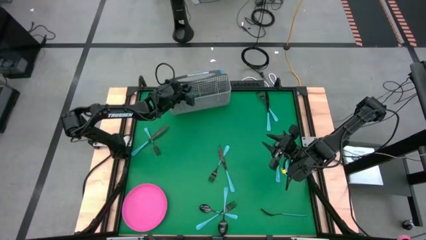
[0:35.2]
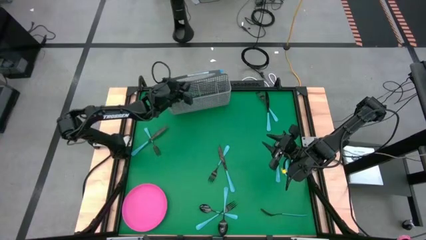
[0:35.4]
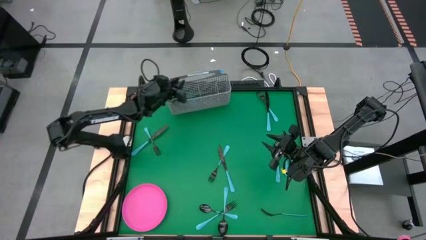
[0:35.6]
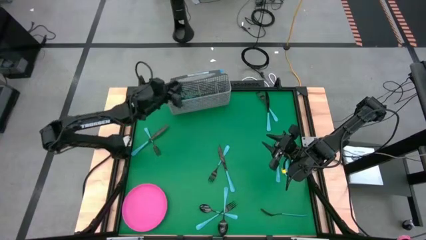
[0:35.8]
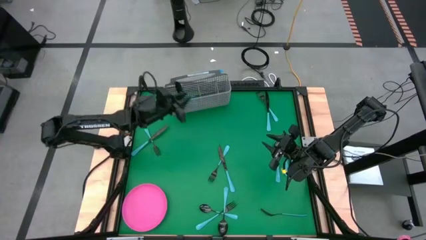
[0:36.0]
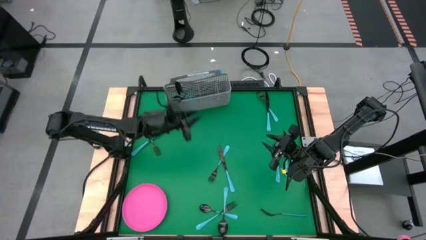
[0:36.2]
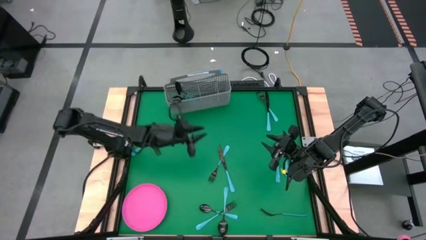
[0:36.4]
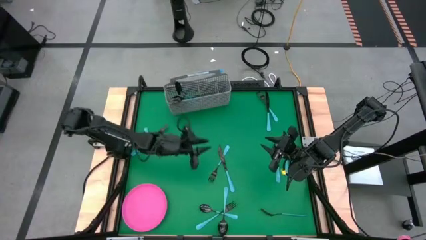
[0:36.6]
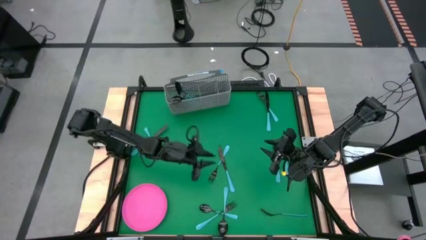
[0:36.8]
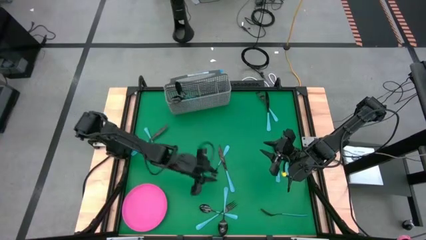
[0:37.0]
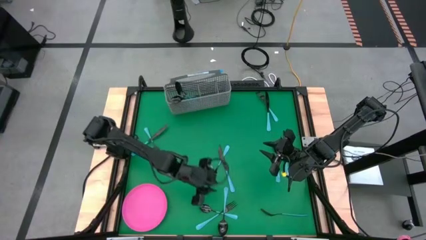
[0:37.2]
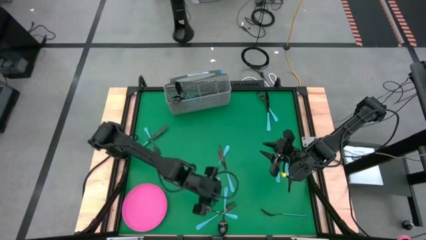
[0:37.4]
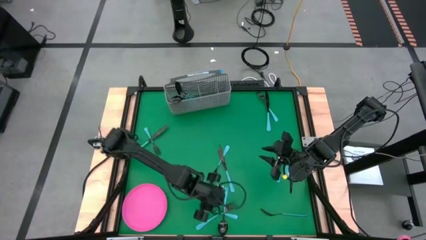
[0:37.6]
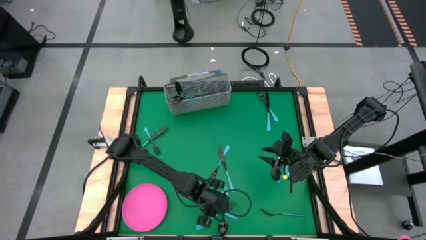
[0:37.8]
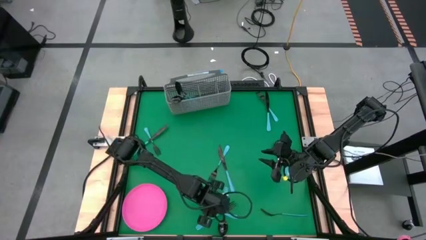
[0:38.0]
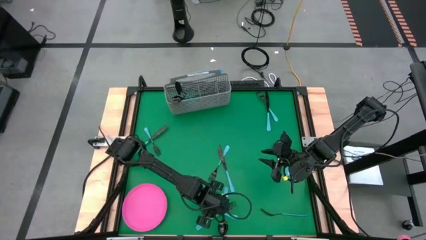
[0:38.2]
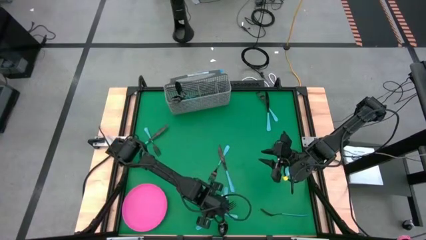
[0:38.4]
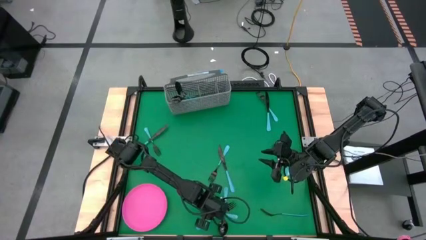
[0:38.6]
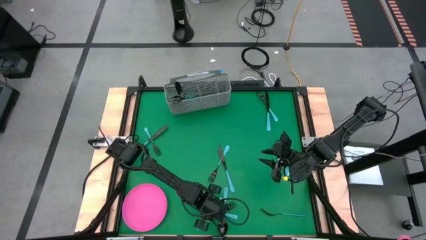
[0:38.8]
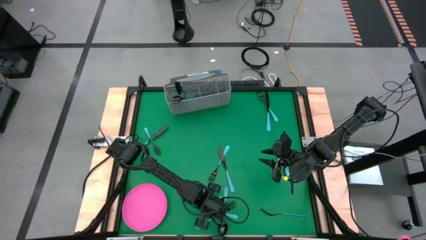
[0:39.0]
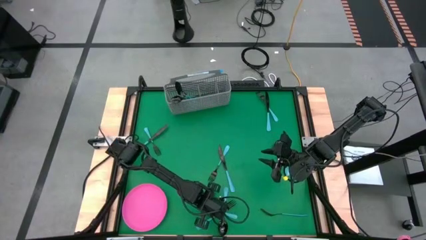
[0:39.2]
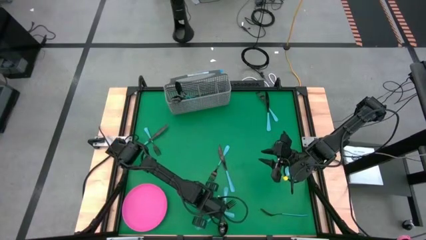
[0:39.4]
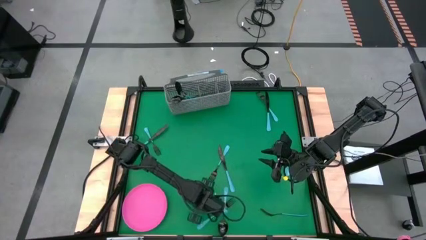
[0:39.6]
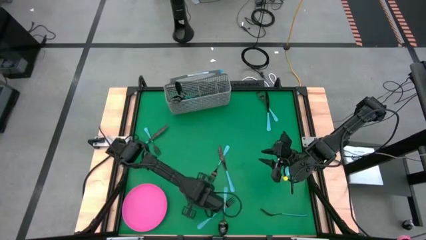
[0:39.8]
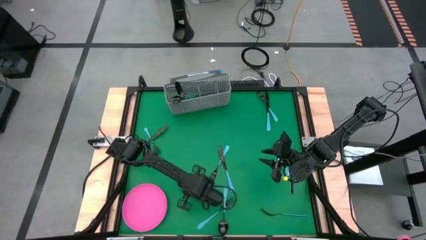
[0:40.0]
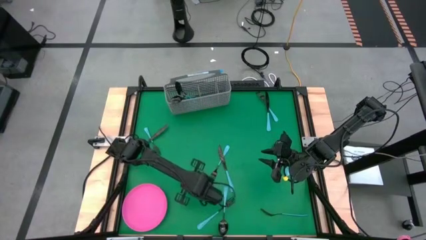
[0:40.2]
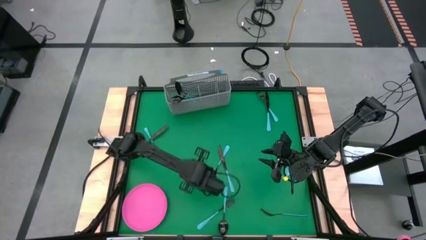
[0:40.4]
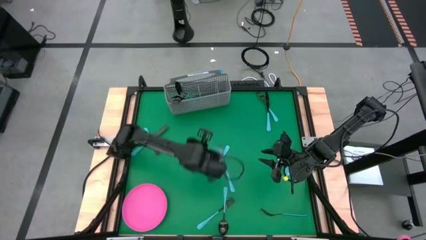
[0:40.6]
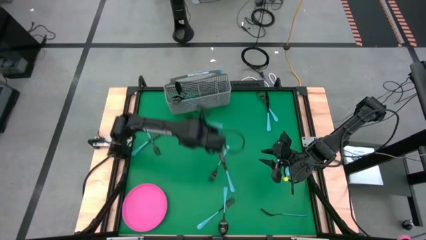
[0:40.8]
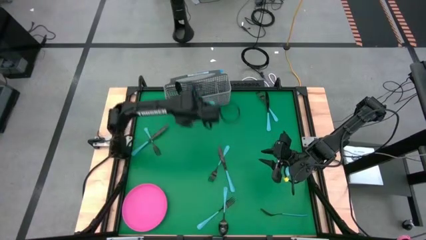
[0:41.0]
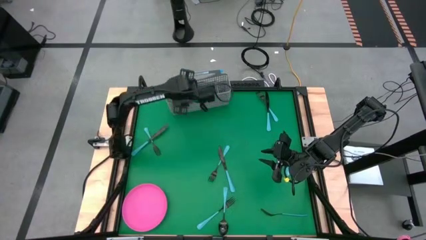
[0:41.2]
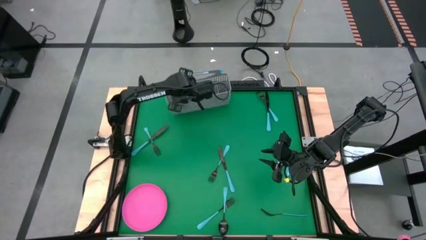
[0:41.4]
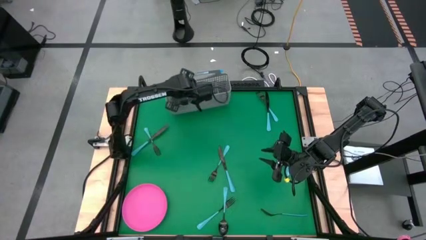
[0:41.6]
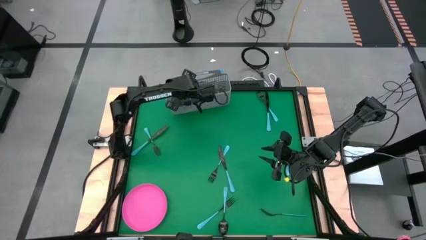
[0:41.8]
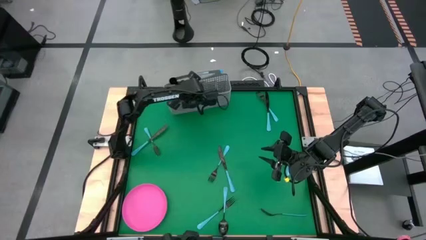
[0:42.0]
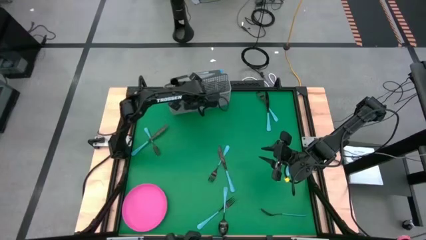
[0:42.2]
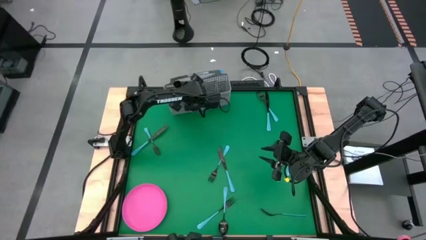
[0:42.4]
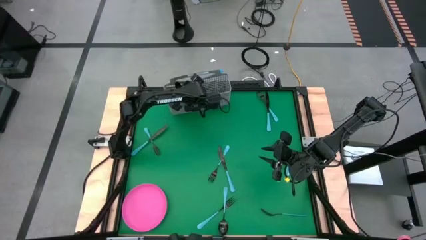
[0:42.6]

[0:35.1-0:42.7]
Task: Sort silverware
Put the blue spoon into the silverware basket

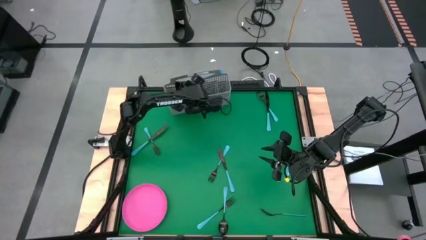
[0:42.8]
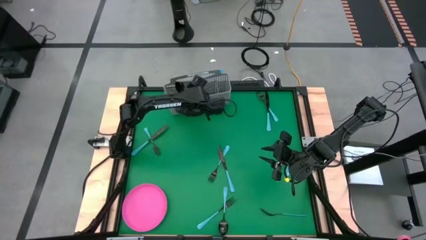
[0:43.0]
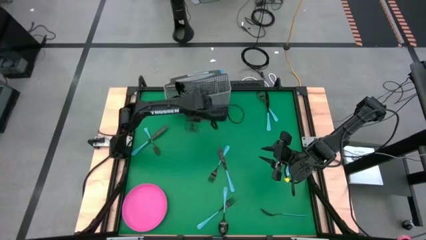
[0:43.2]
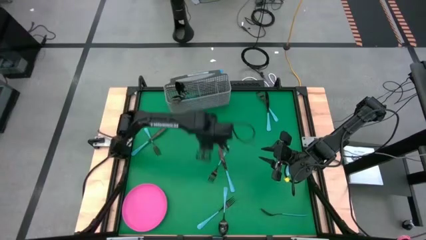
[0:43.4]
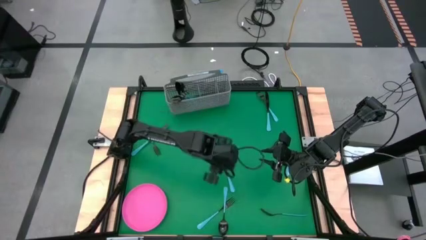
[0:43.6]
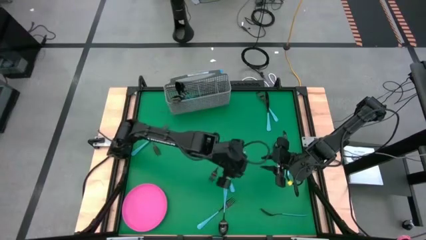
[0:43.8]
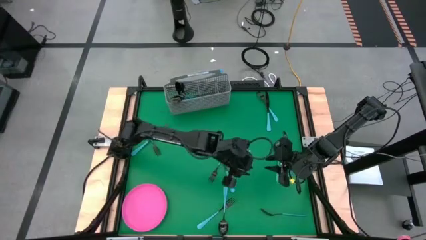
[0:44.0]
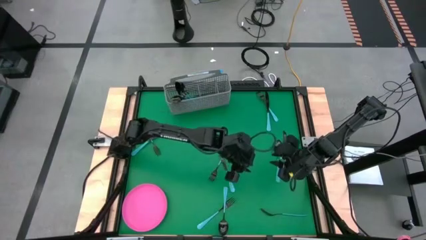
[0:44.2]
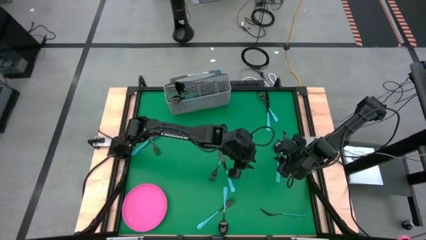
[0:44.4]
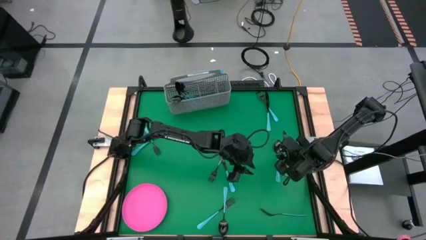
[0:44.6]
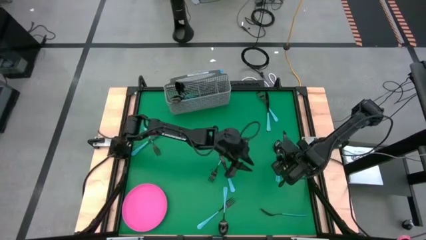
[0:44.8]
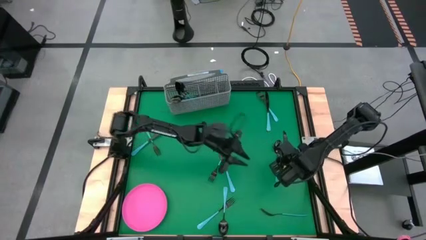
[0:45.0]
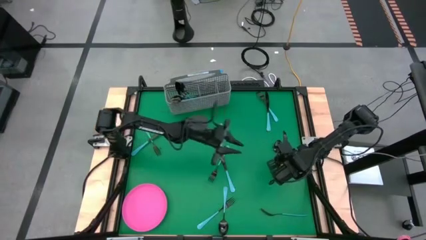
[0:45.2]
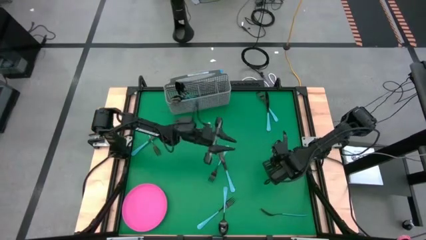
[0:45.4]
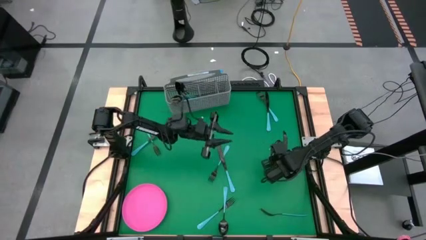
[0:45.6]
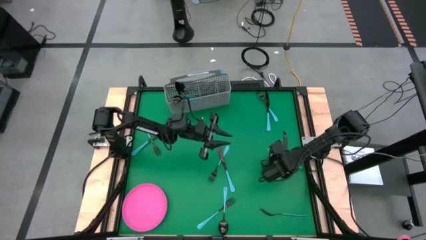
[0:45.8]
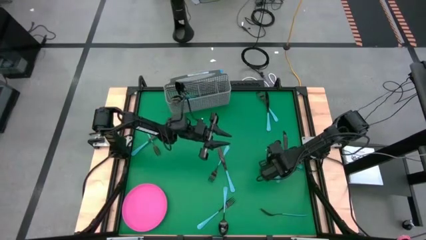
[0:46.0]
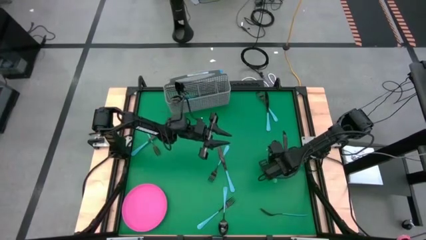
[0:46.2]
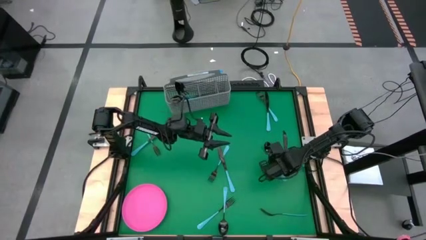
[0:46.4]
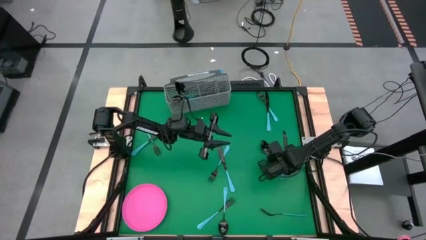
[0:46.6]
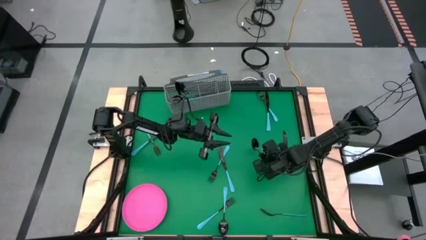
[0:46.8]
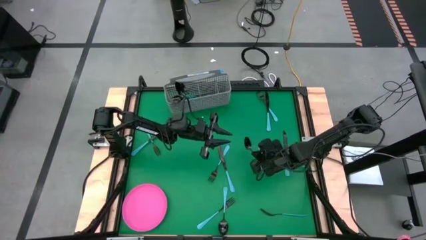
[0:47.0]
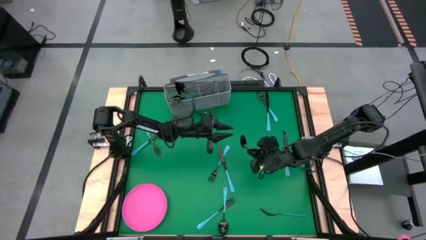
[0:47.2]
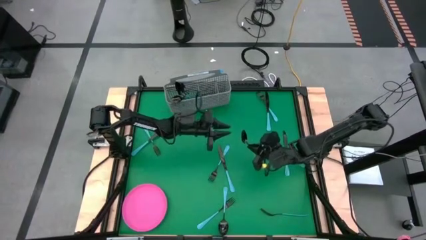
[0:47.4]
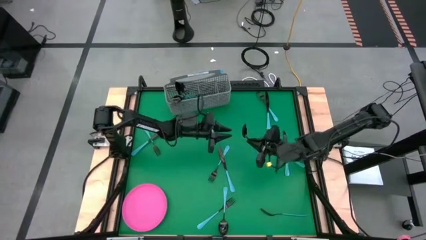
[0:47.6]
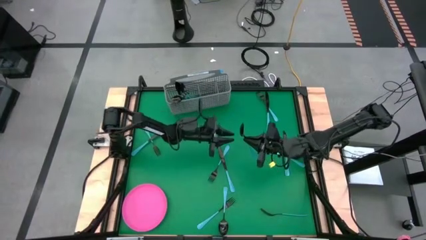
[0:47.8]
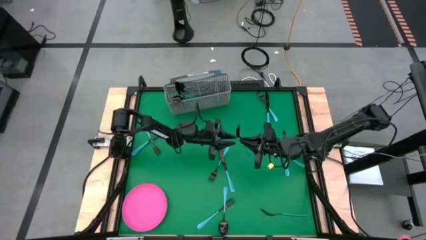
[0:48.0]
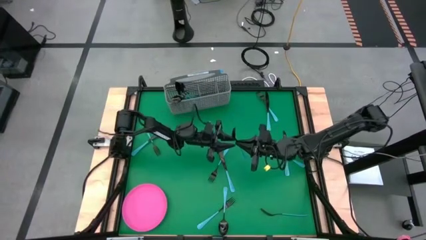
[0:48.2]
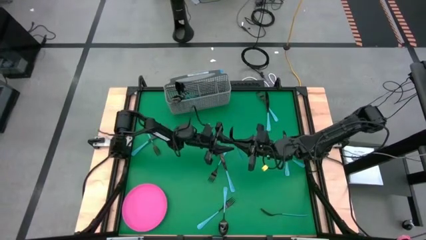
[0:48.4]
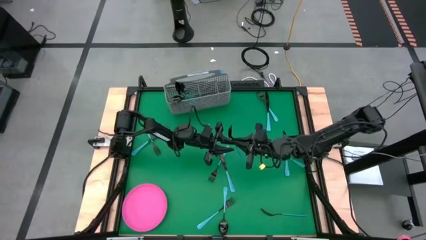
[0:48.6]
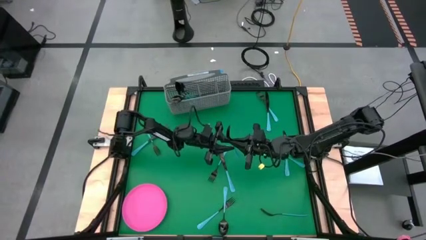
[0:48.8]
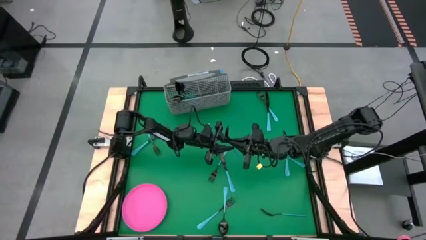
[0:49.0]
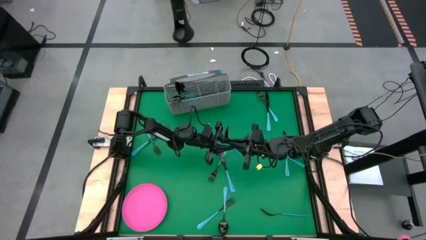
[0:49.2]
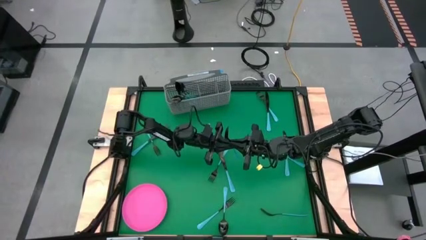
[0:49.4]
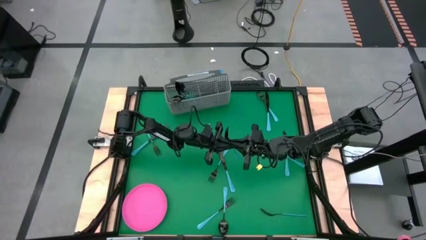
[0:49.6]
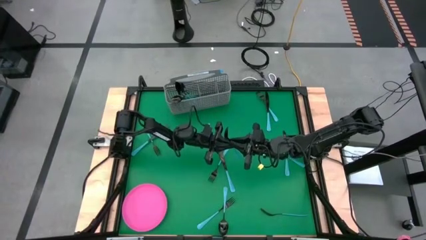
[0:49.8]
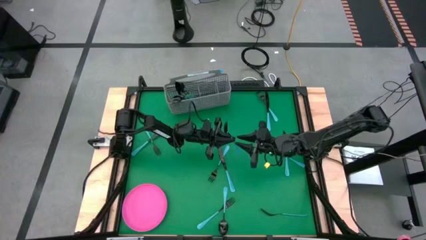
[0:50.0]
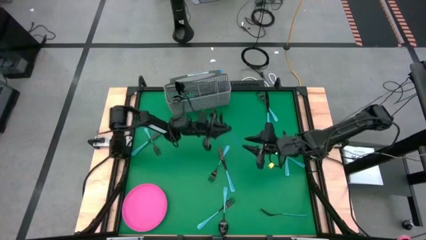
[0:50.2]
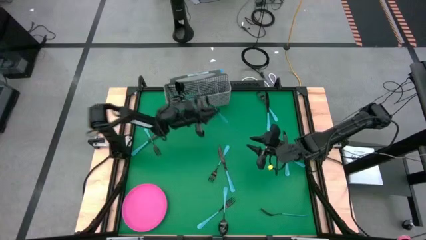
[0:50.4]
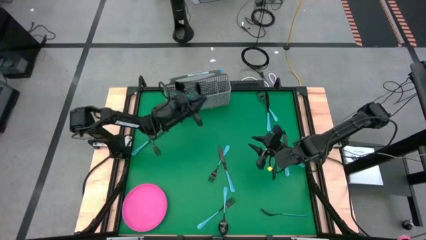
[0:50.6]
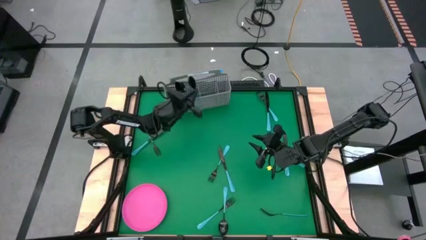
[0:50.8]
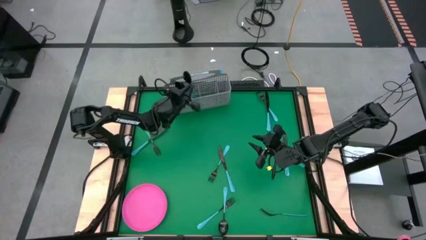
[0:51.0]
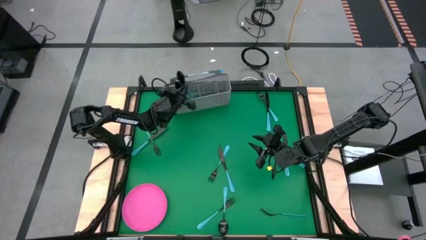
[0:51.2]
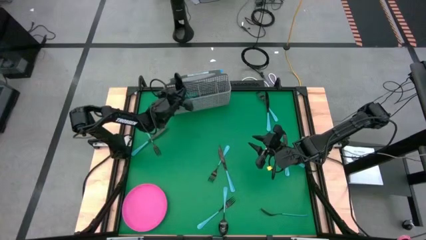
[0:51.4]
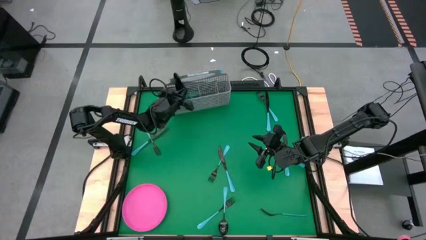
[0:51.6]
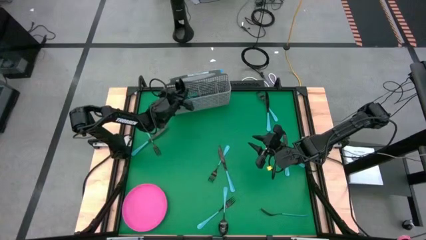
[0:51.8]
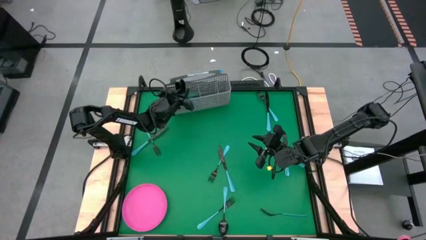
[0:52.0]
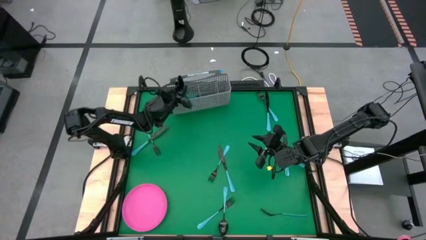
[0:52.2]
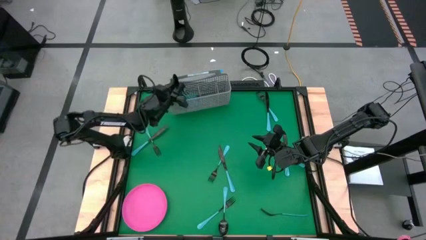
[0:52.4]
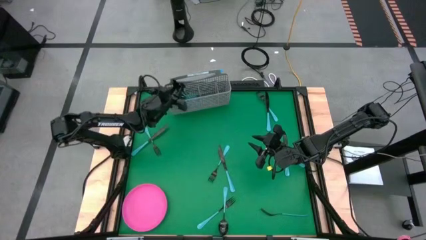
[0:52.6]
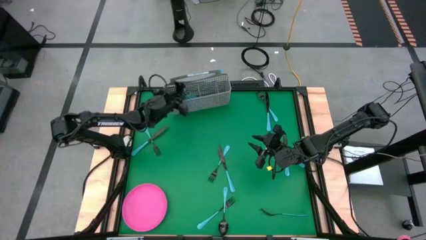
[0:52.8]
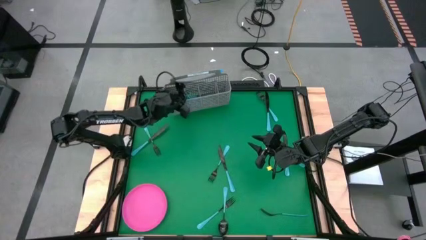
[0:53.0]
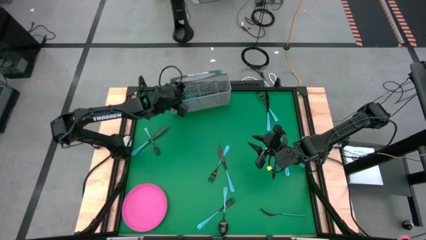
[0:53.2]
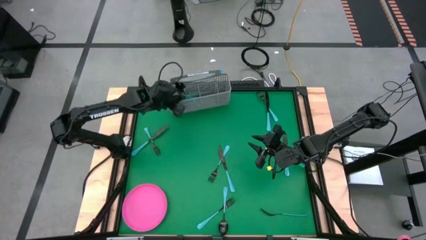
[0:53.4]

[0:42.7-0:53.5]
Put the blue spoon into the silverware basket
